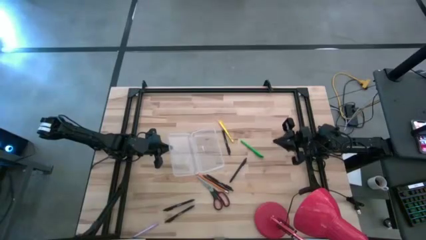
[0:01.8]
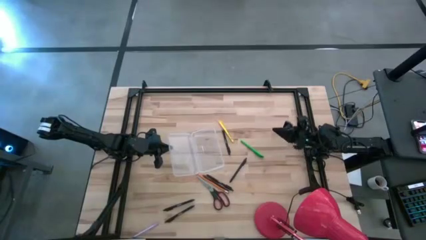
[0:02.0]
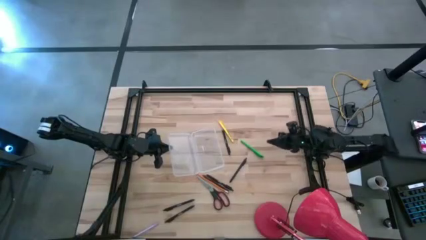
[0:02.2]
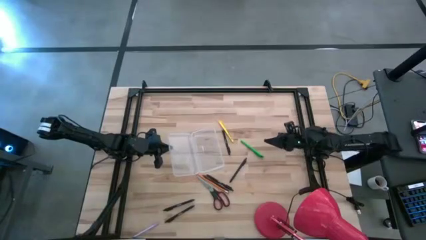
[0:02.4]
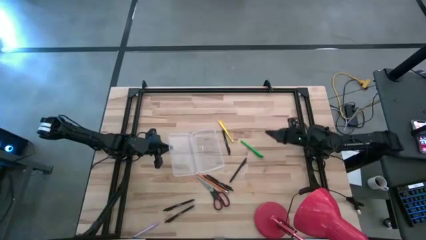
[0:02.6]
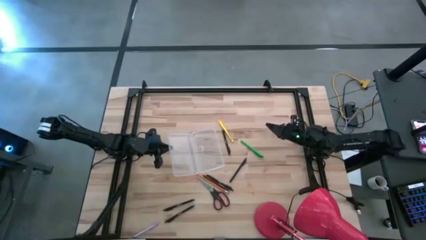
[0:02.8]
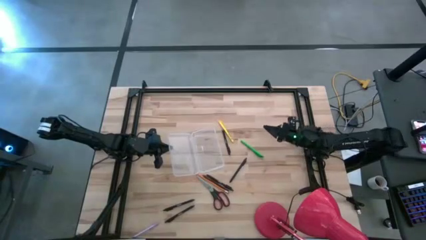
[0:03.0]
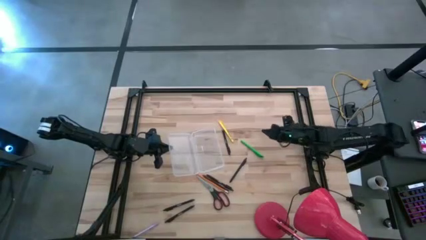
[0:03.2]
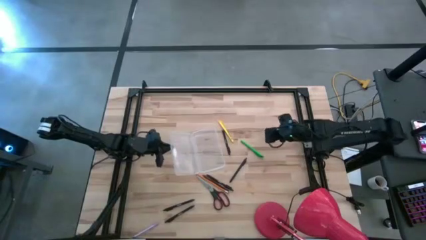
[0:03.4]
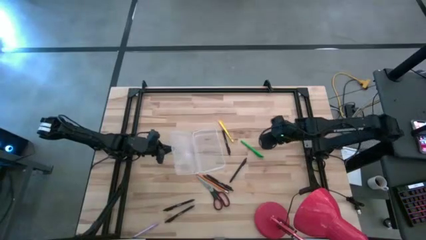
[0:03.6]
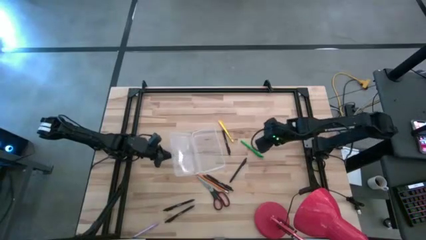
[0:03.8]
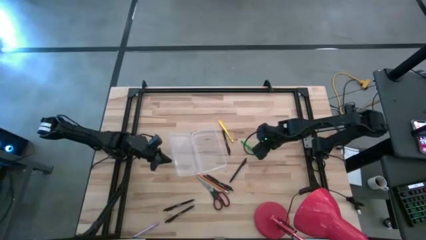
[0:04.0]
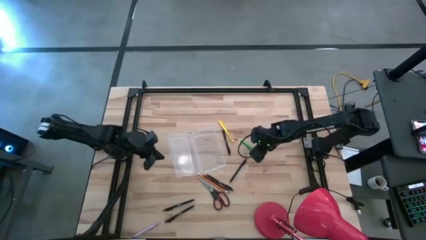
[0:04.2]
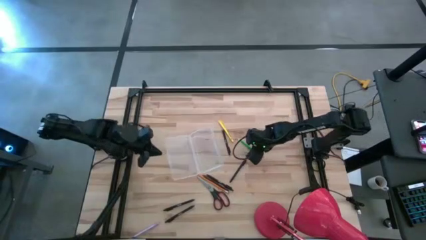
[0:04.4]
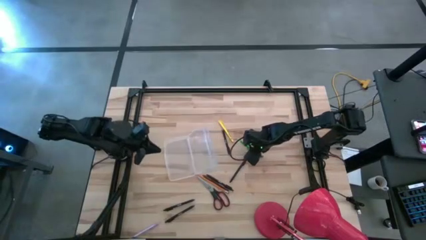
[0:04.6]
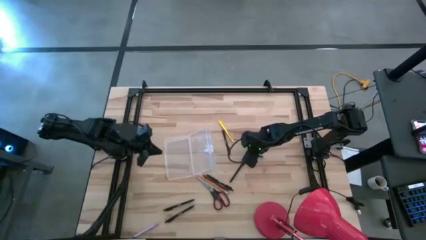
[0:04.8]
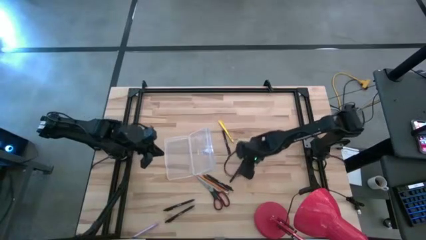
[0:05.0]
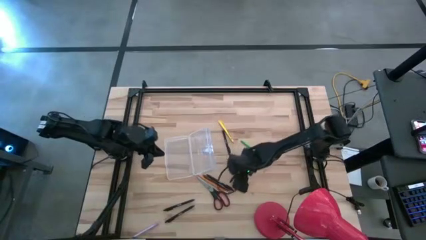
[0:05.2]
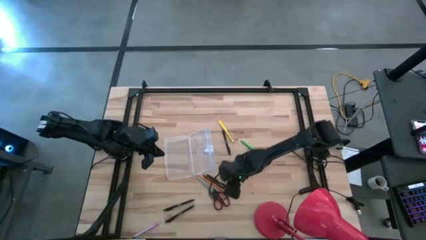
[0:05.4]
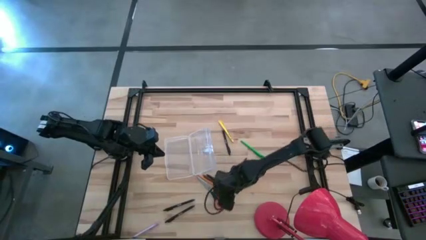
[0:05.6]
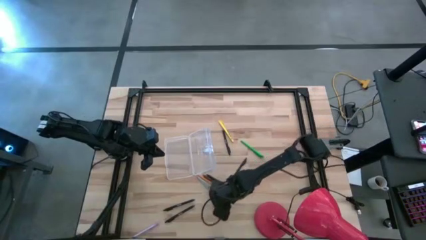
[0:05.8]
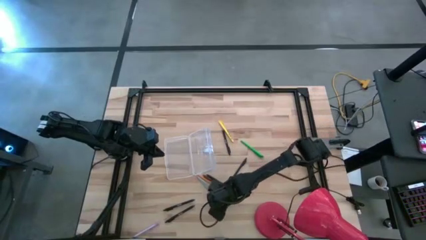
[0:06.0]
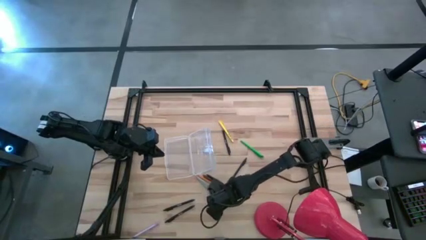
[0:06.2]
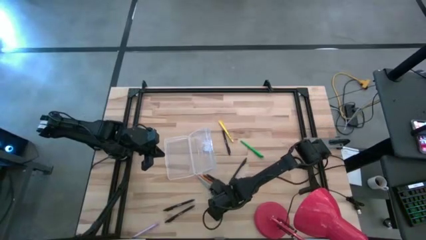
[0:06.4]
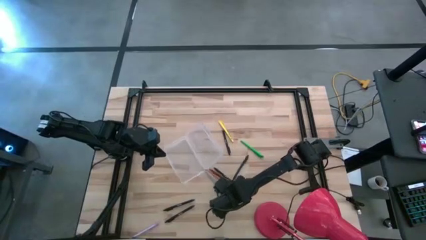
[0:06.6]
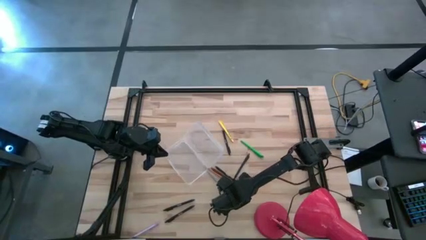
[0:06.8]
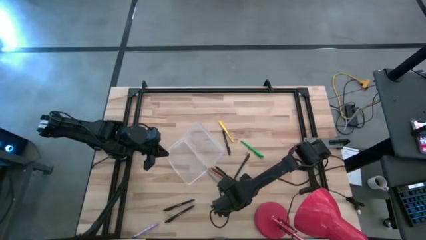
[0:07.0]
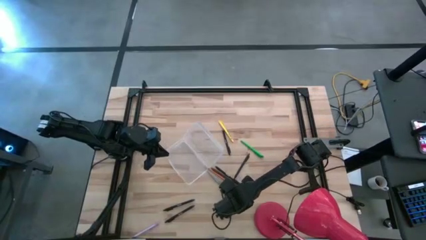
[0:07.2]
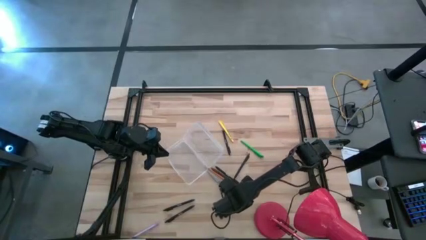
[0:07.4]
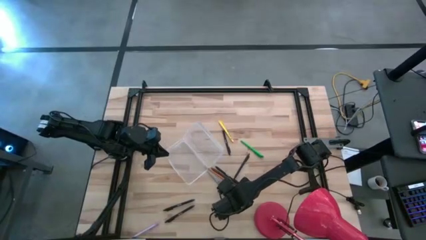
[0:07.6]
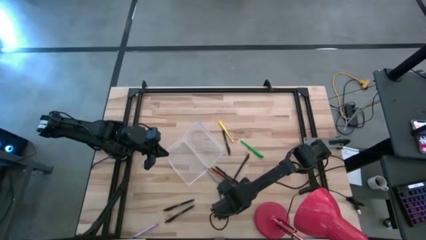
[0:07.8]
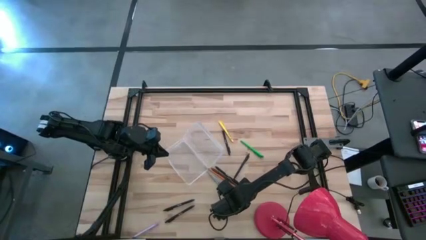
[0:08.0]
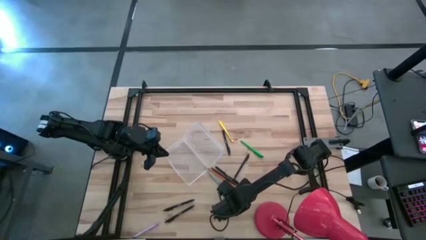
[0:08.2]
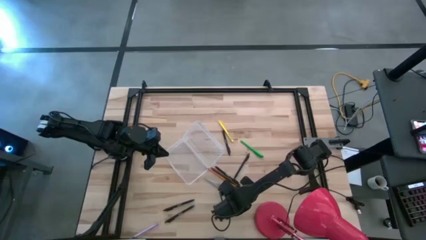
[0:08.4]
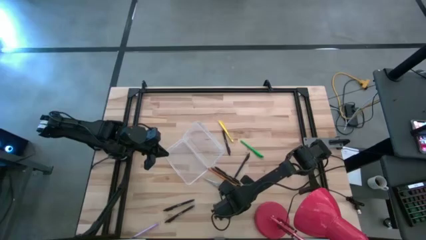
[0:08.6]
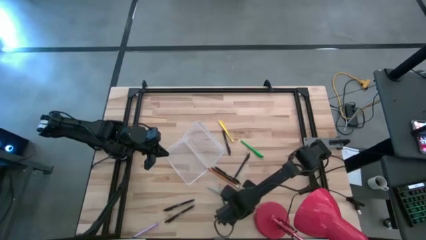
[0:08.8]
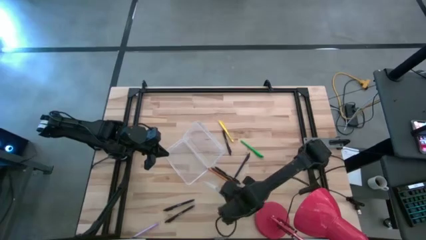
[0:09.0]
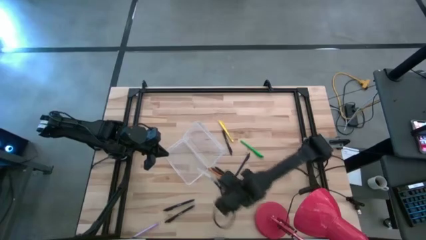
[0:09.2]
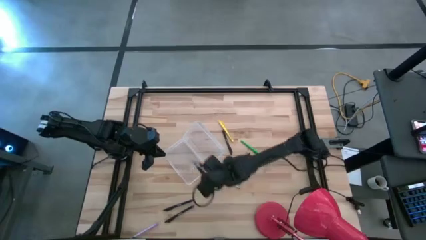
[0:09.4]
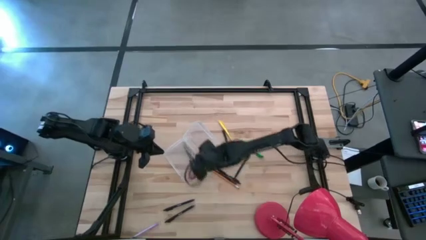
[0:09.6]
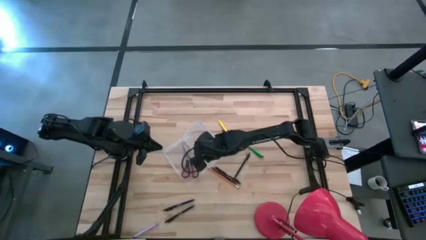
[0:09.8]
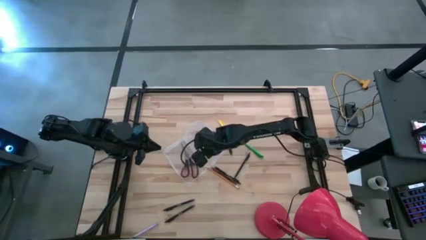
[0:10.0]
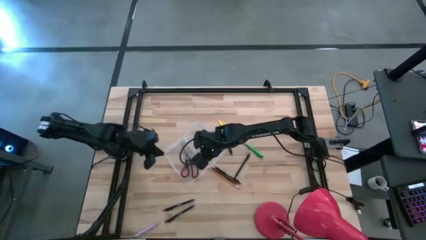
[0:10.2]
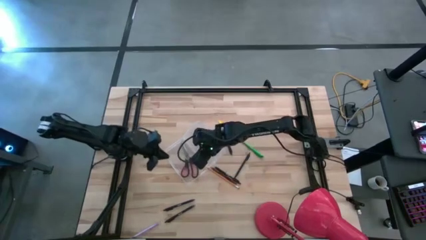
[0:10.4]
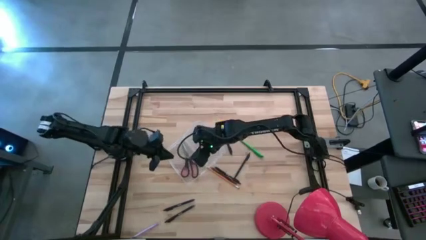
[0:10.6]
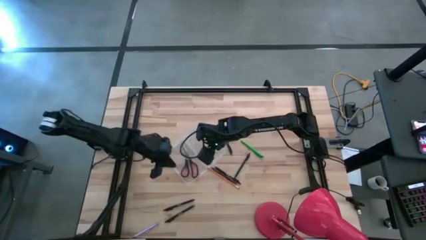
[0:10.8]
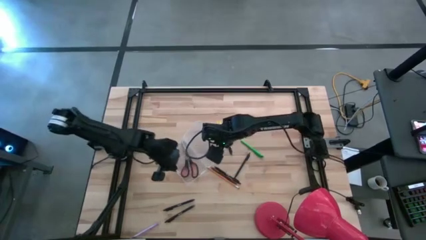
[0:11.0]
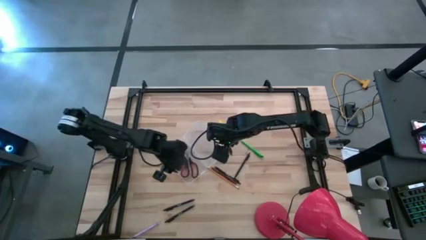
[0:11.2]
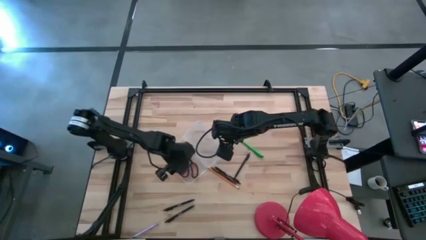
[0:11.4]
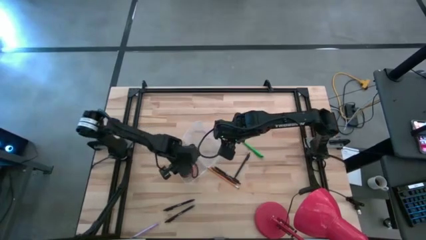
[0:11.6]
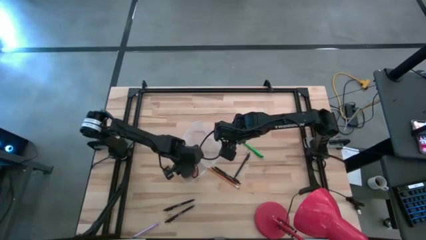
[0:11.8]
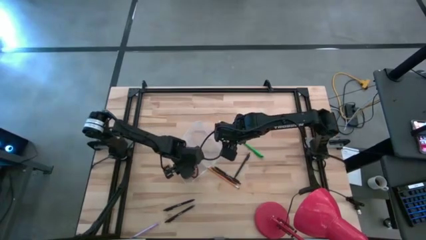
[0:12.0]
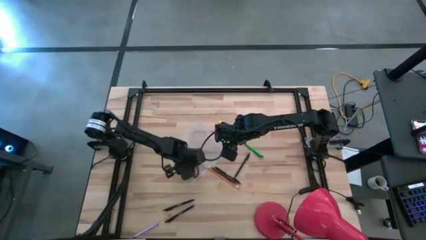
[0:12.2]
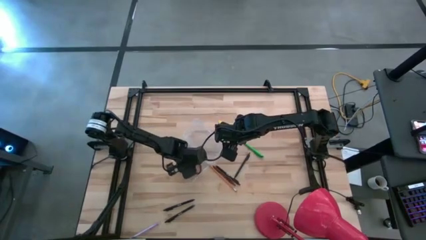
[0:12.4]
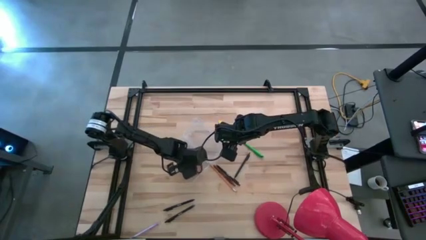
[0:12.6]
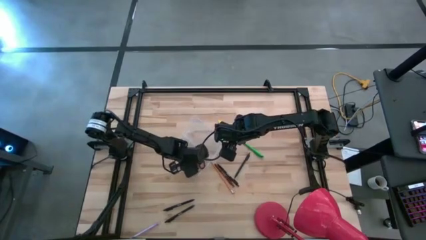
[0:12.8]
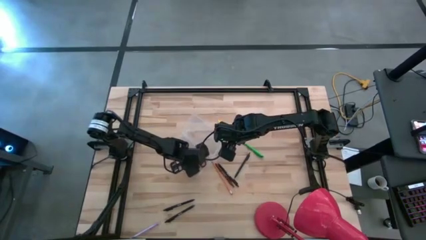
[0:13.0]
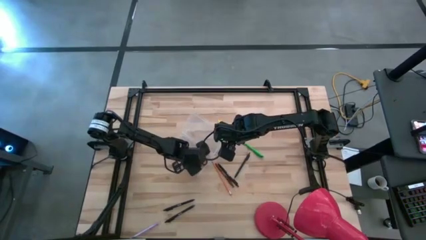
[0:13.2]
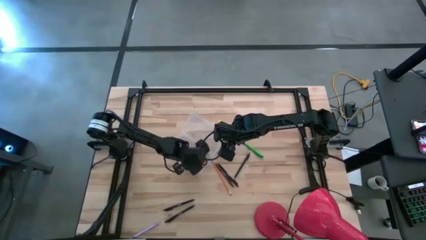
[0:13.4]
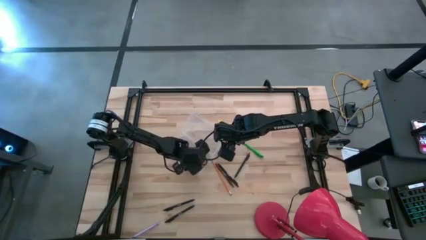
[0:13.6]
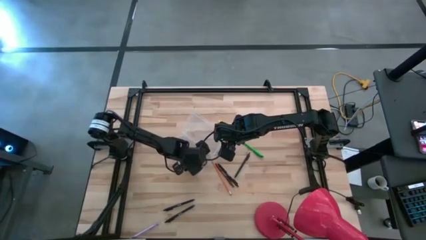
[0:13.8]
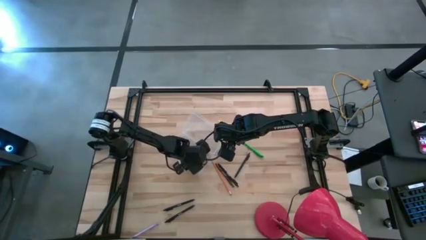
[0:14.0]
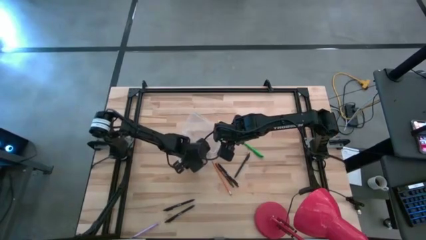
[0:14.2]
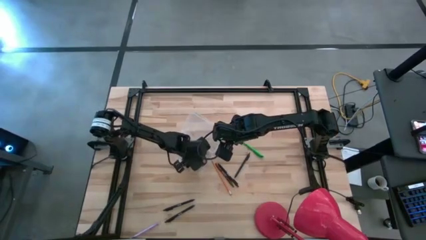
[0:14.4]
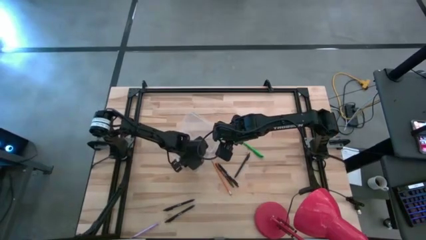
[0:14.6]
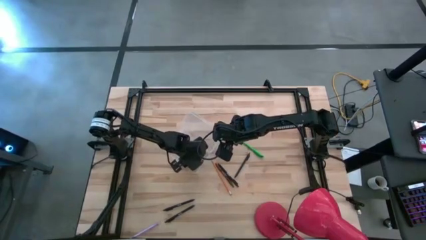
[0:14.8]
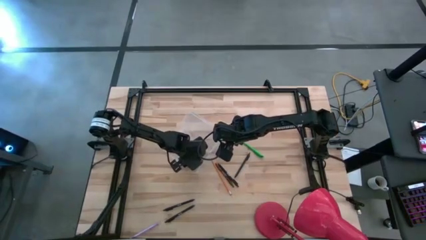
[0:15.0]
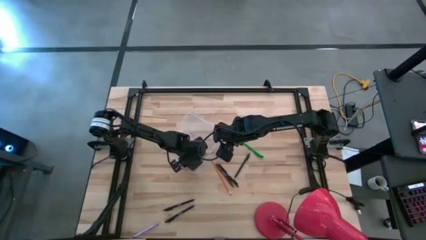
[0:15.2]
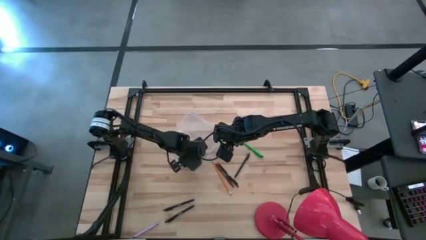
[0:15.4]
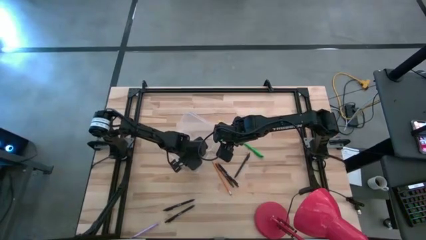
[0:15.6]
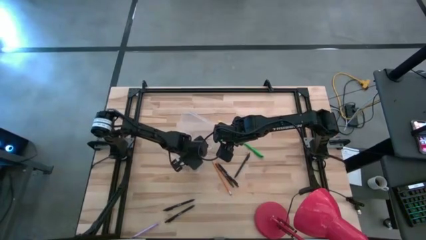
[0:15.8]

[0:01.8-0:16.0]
Task: Pick & place school supplies into a supply box
Put the black scissors into the transparent supply box

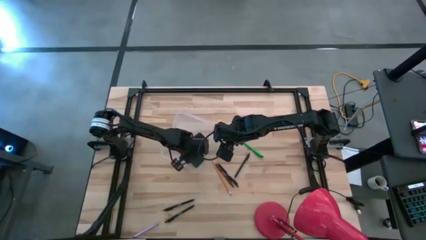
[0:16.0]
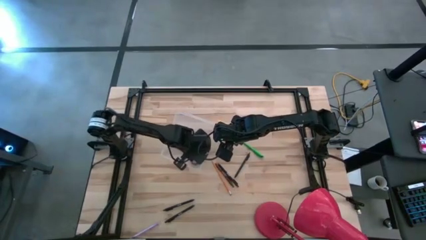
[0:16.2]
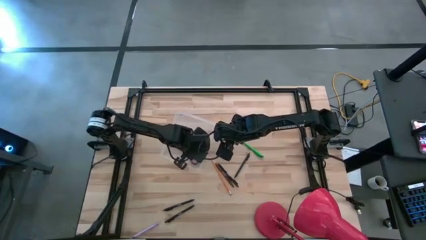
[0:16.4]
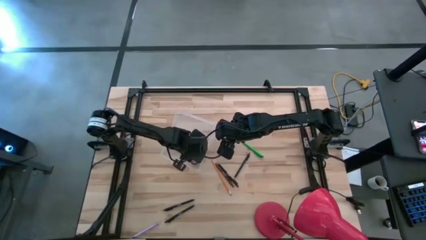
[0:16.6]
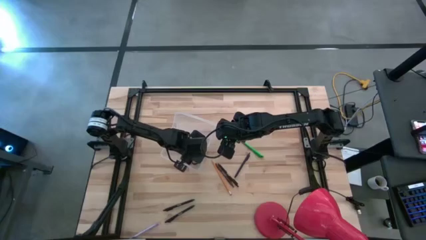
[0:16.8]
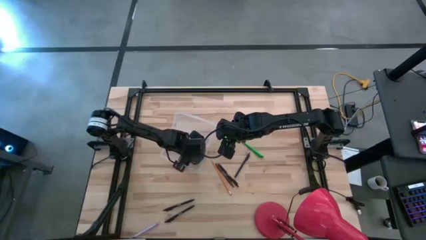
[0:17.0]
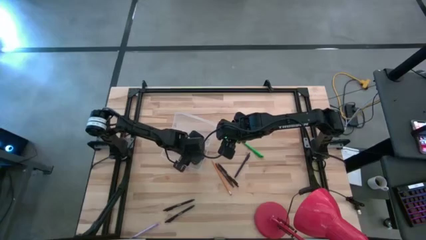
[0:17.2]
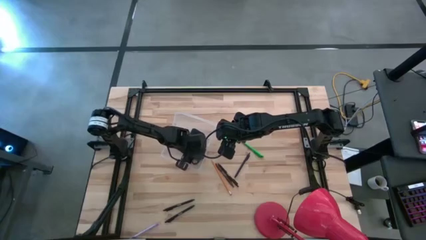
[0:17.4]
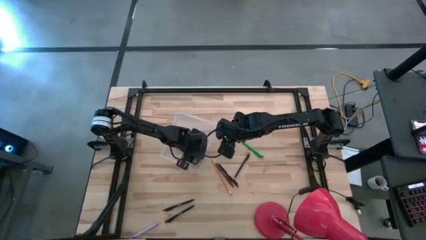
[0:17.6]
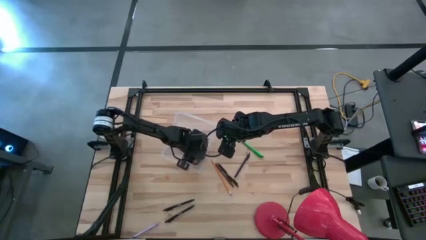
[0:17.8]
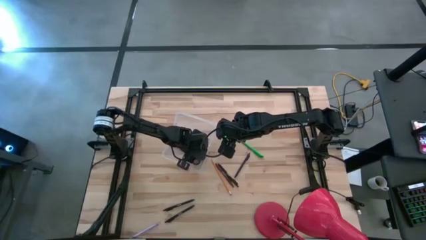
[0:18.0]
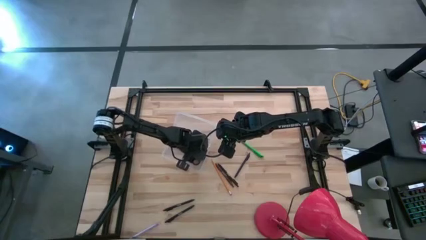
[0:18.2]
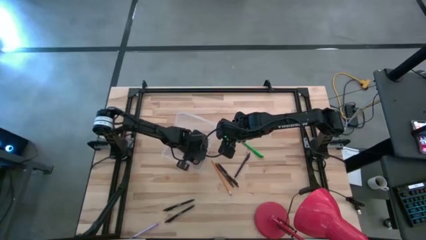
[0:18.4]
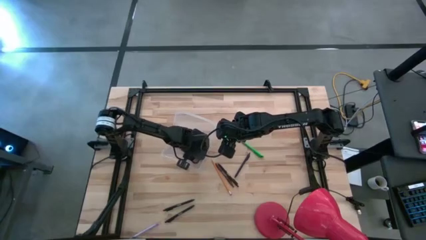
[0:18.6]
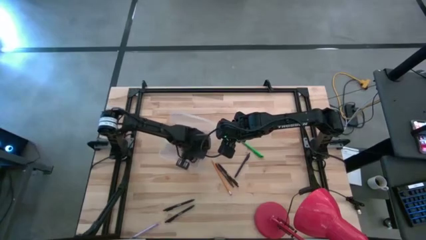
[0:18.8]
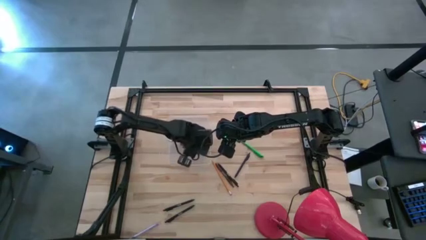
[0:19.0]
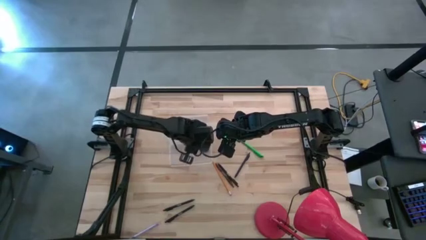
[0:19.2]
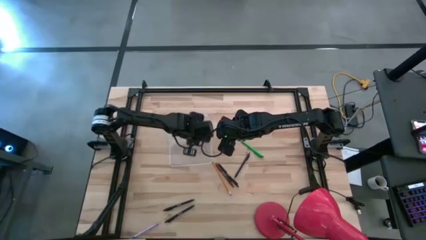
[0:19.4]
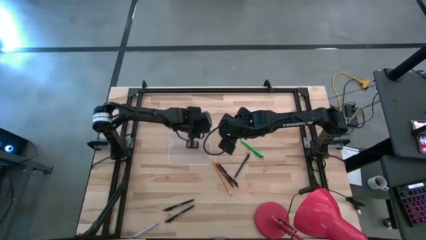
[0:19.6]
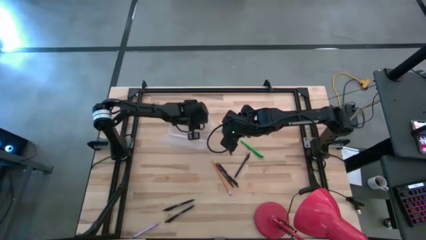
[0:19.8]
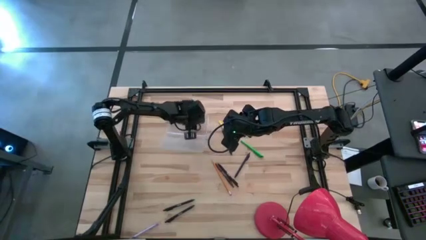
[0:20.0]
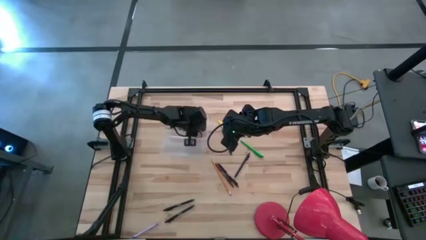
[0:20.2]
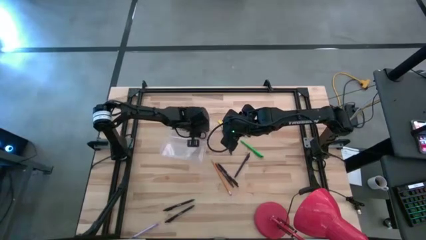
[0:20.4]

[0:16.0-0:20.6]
Put the black scissors into the transparent supply box
